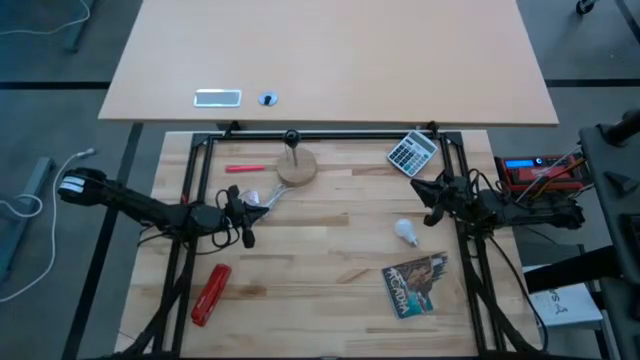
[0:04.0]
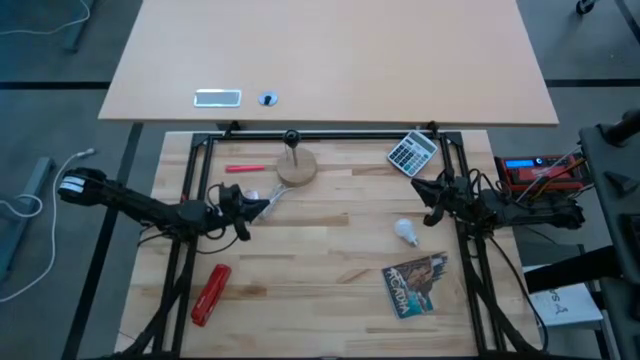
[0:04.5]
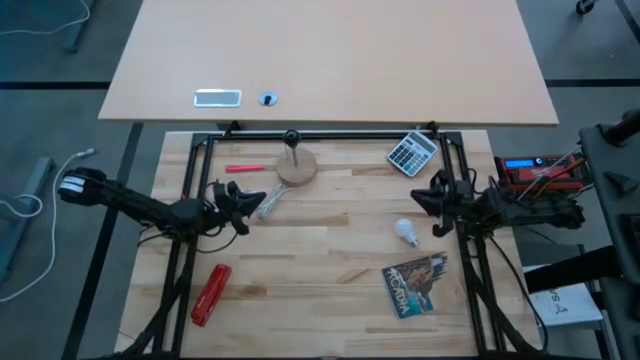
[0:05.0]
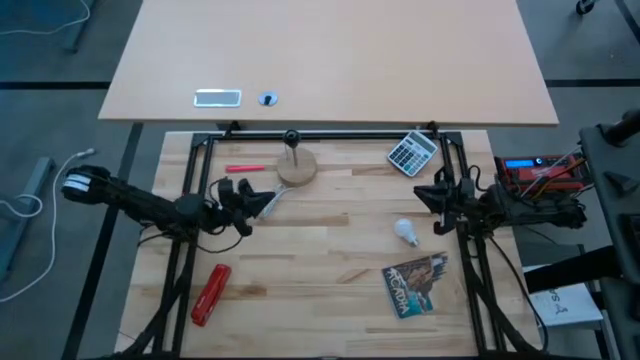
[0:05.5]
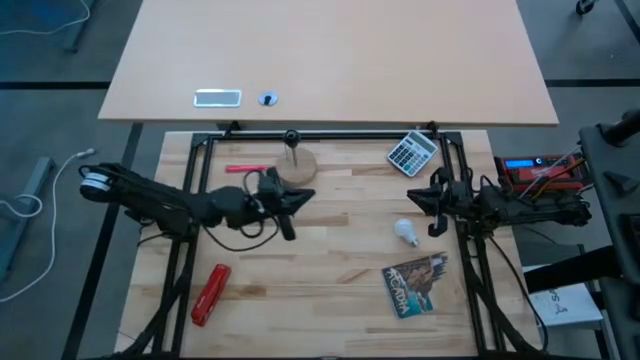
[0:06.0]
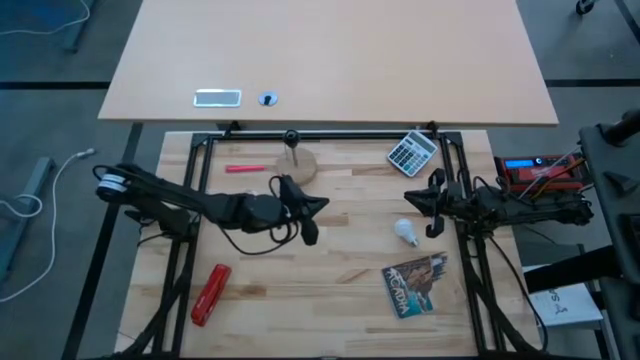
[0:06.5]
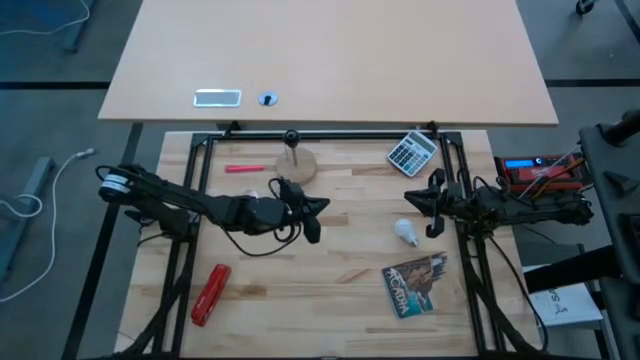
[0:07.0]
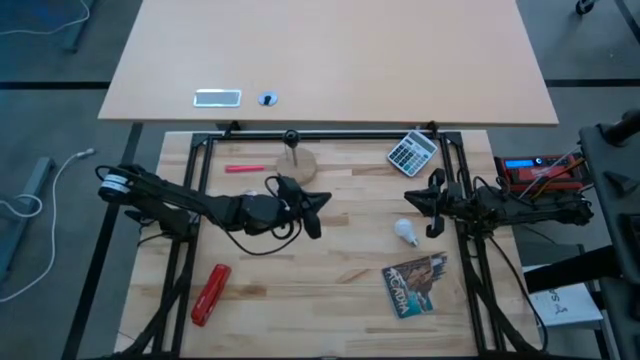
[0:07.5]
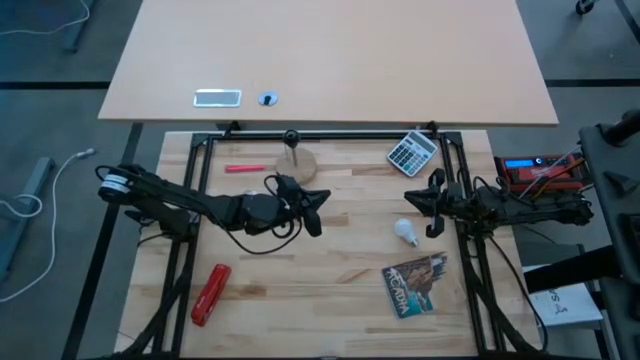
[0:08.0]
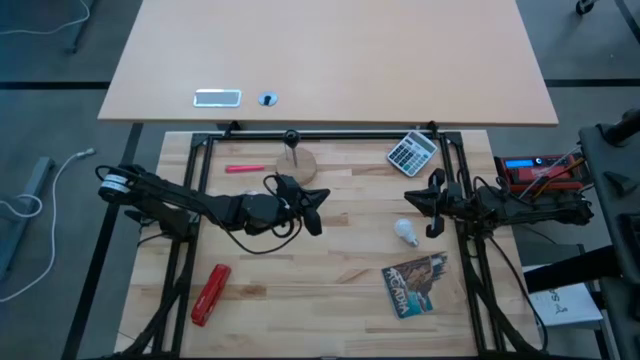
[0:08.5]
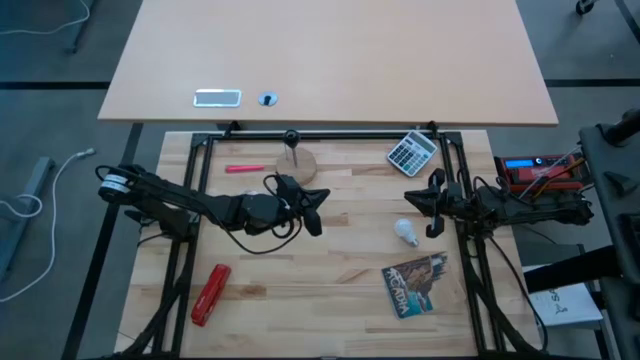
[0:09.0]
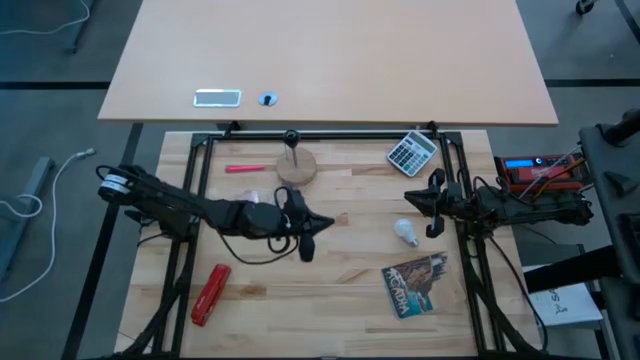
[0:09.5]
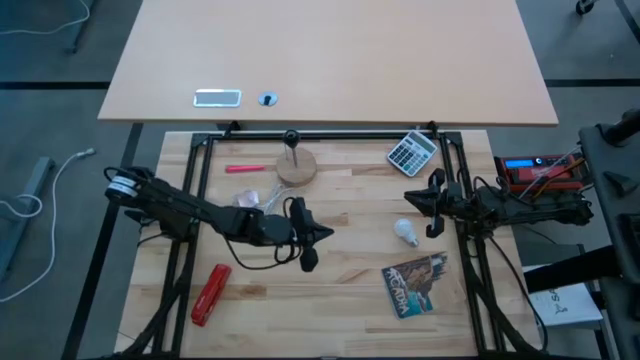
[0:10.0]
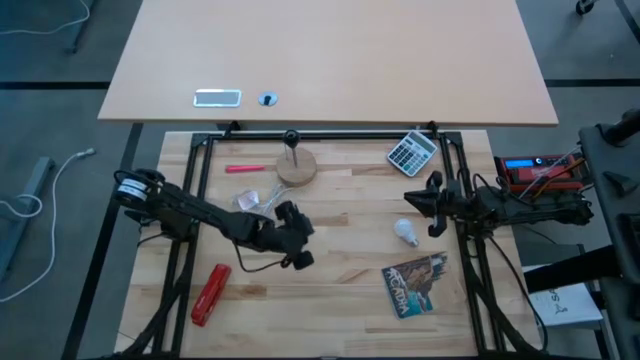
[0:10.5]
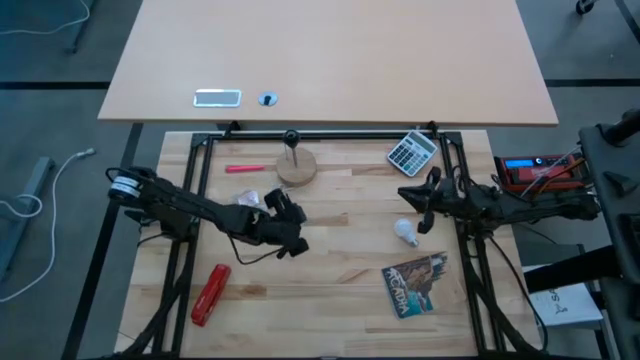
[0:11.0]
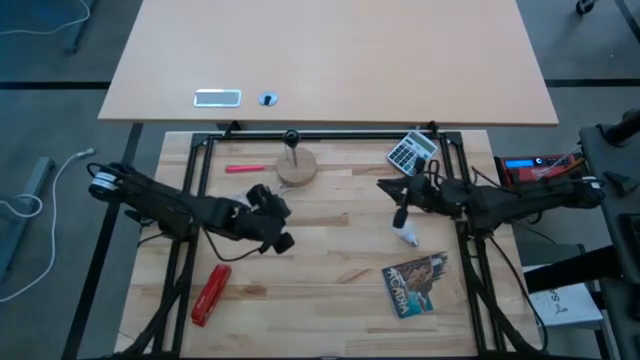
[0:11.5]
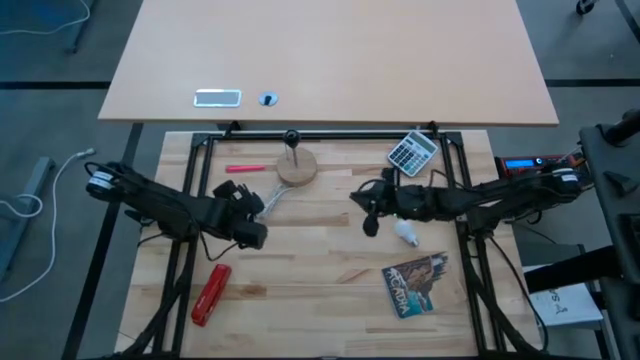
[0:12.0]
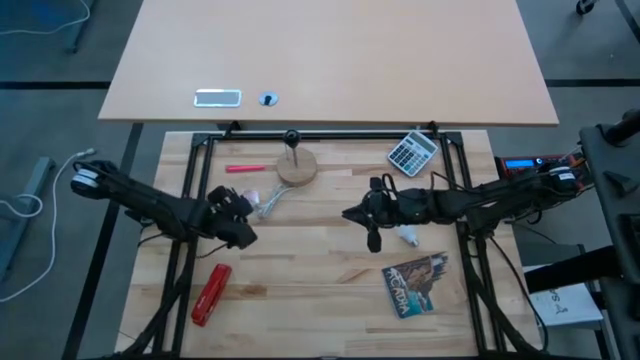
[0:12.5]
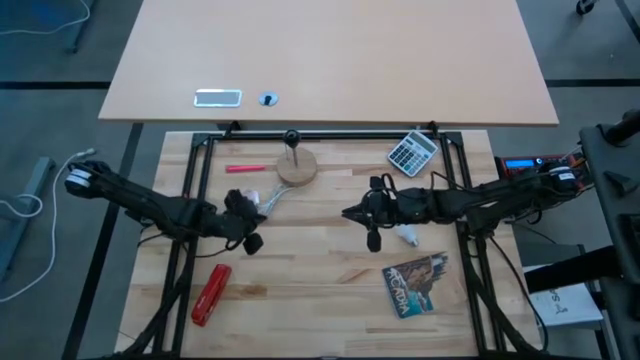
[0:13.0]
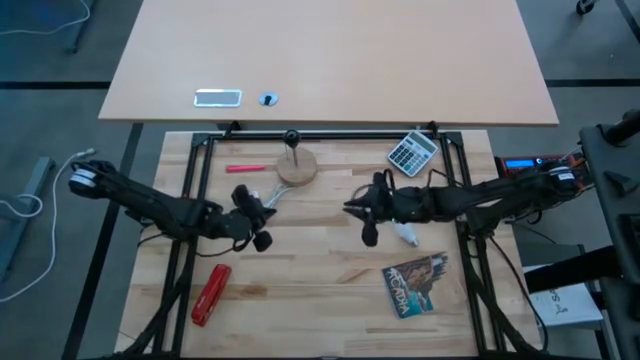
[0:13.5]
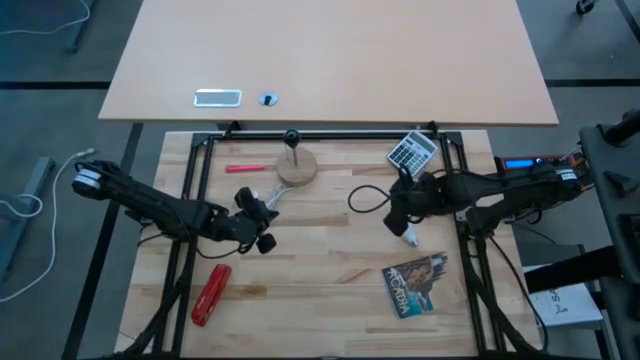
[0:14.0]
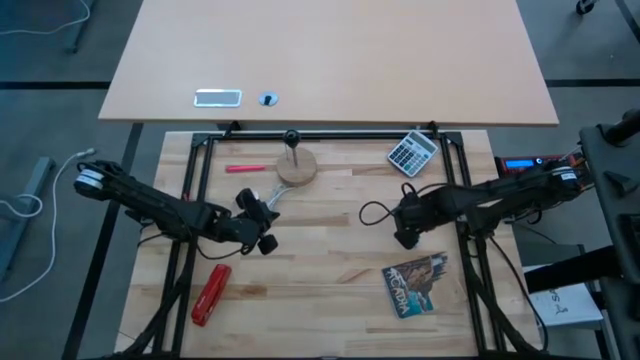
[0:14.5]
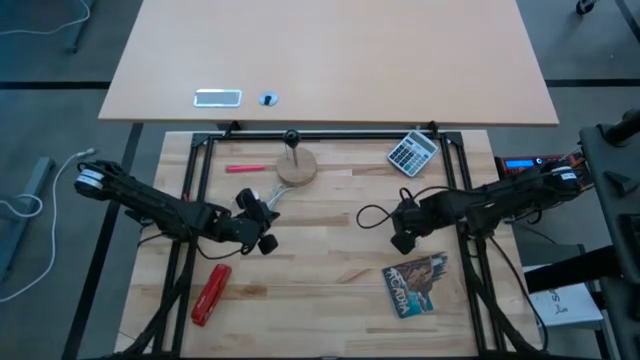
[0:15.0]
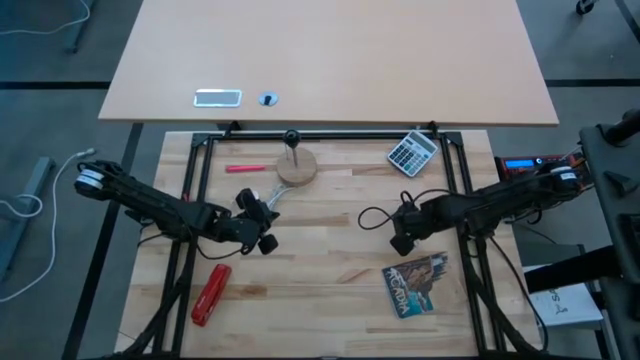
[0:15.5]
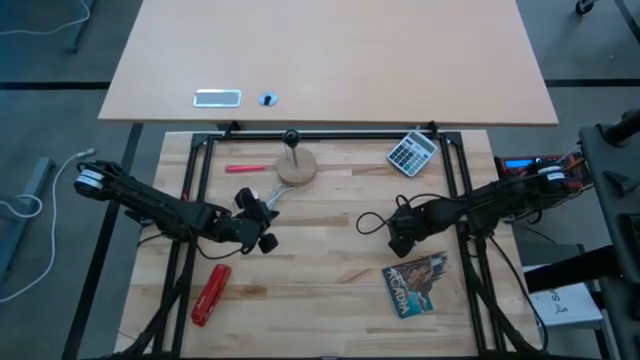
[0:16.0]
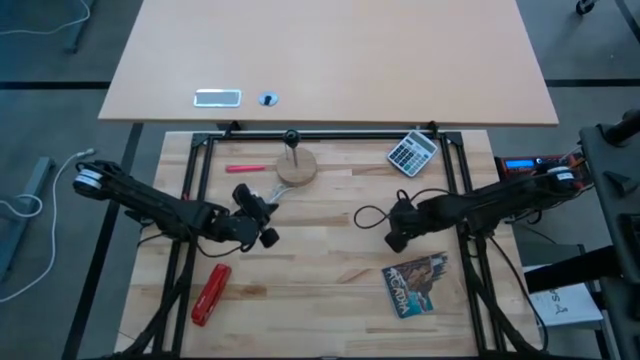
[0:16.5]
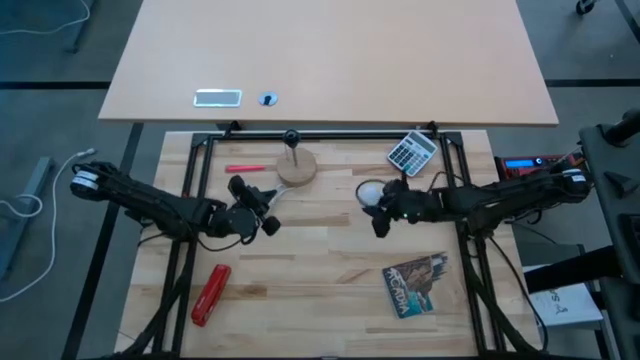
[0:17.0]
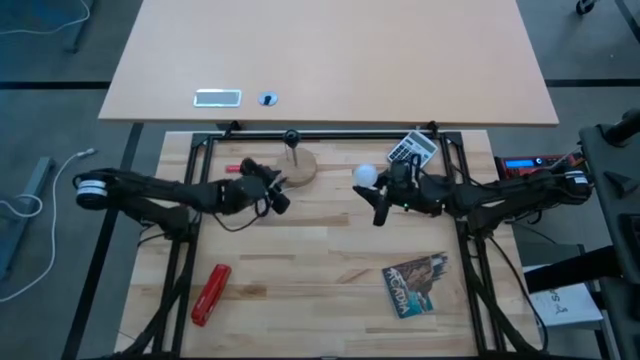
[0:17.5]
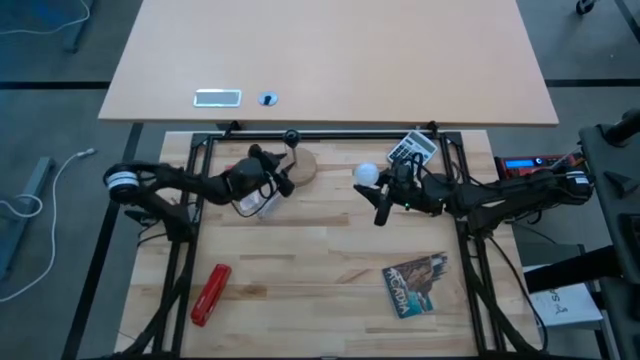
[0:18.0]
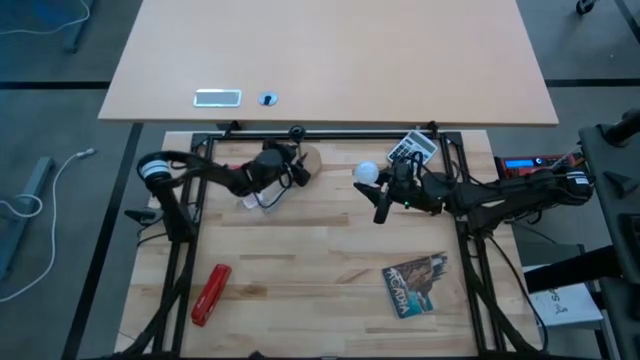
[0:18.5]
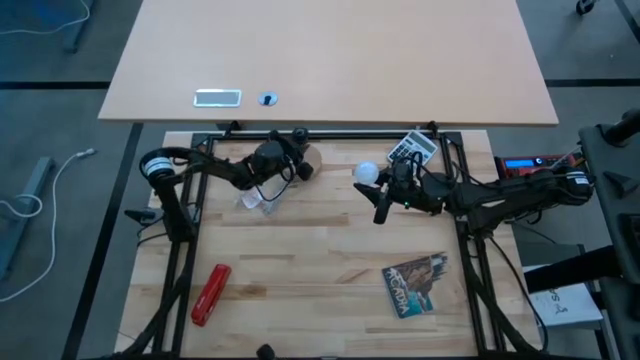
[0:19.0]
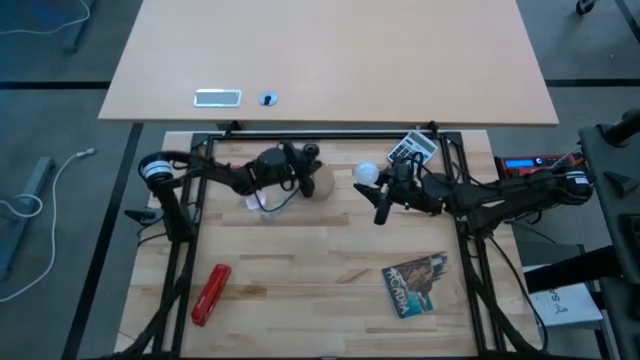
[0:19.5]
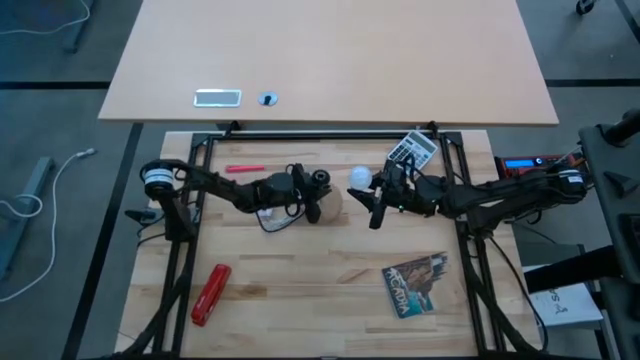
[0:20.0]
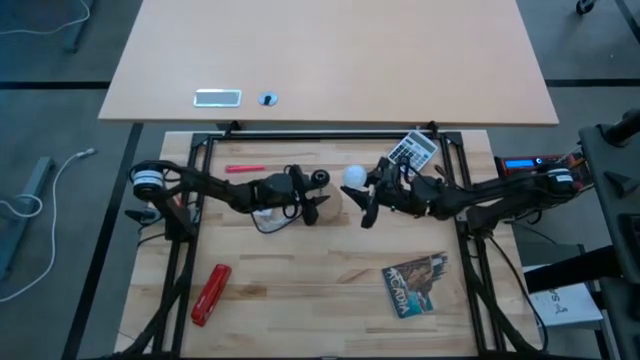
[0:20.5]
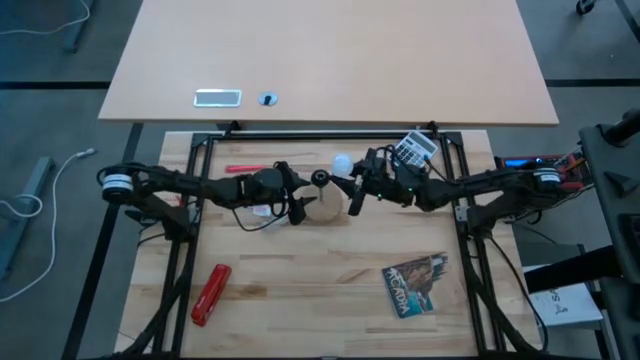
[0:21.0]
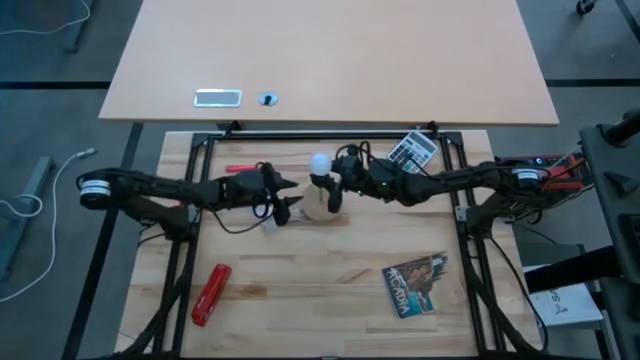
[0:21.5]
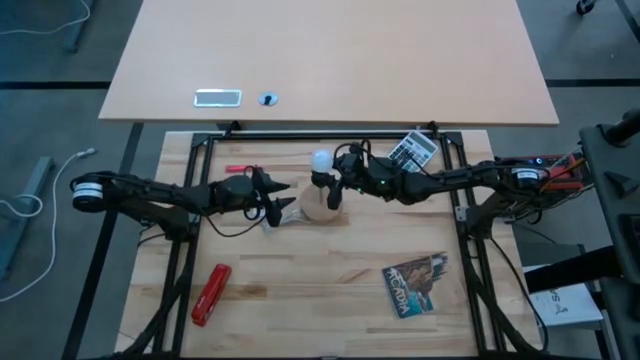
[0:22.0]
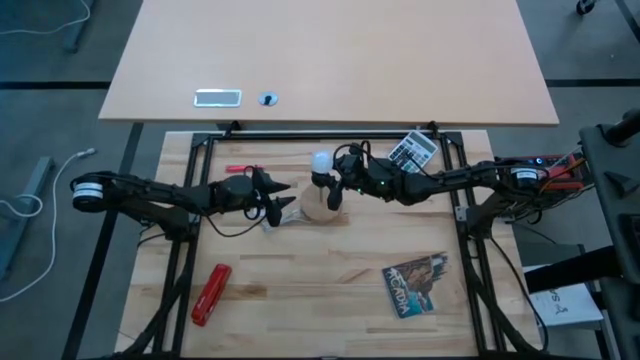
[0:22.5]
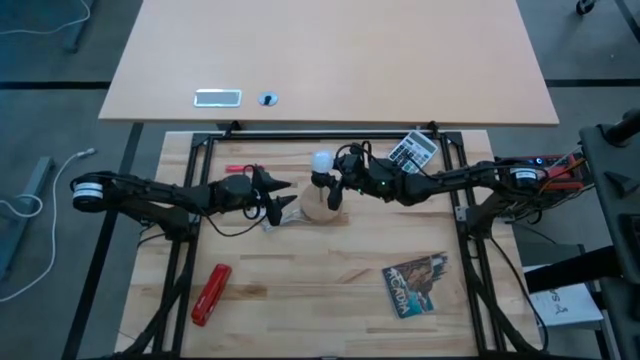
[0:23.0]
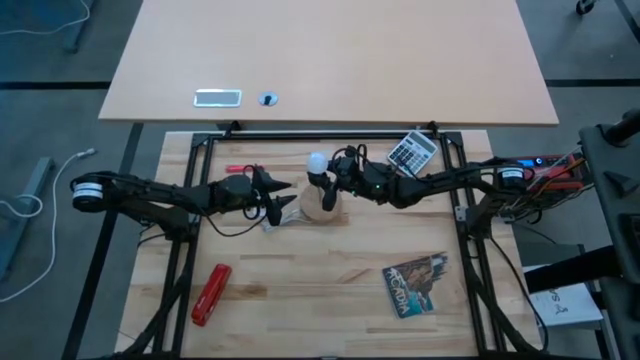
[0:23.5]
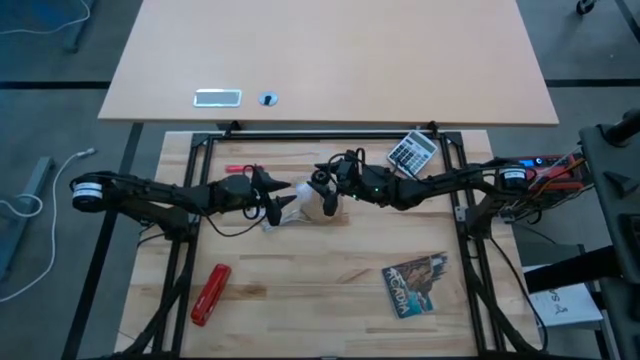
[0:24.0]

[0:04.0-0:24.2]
Task: Screw lightbulb
Insert the lightbulb into the lamp
